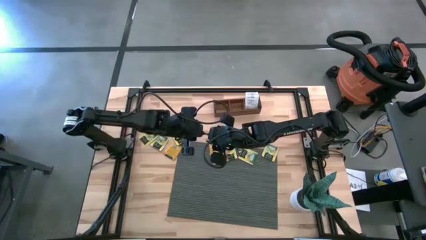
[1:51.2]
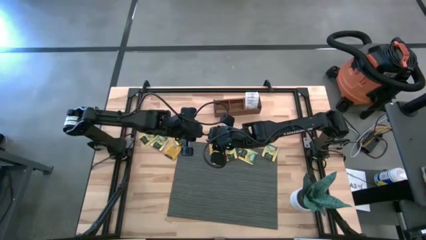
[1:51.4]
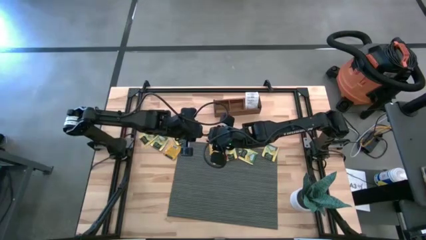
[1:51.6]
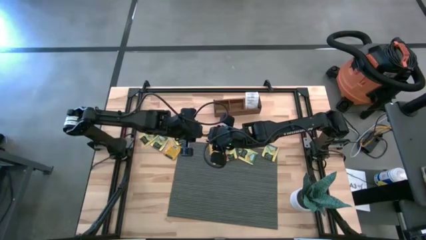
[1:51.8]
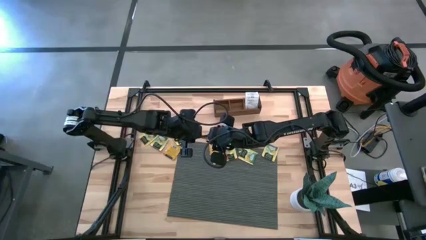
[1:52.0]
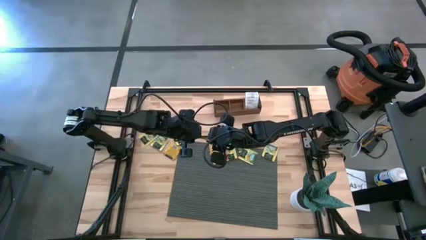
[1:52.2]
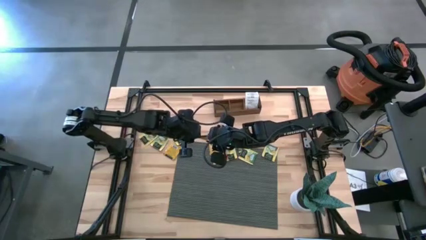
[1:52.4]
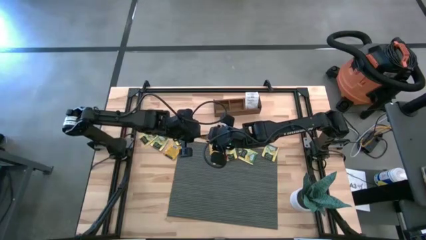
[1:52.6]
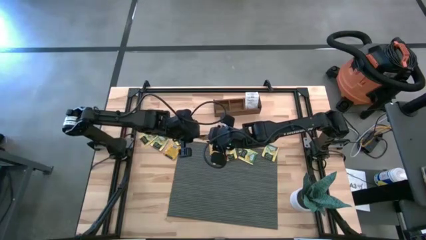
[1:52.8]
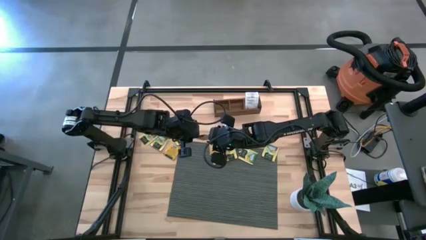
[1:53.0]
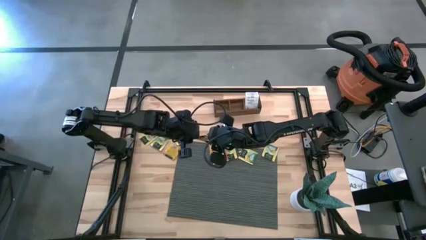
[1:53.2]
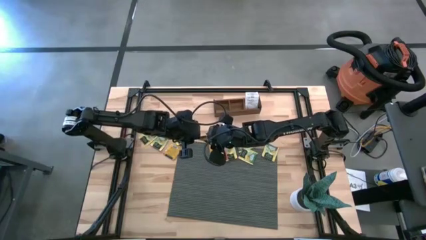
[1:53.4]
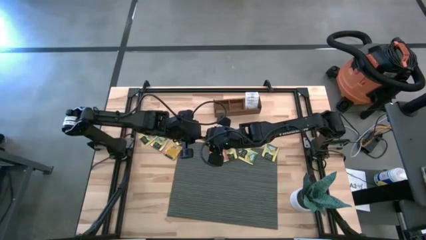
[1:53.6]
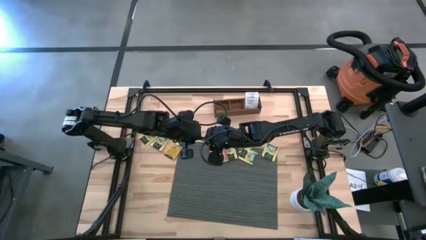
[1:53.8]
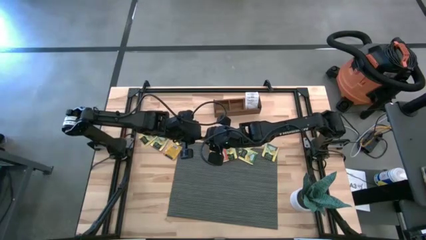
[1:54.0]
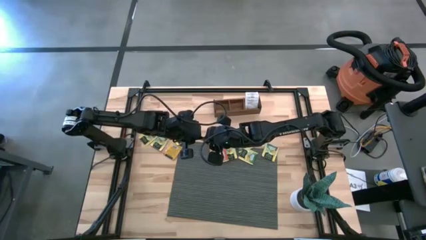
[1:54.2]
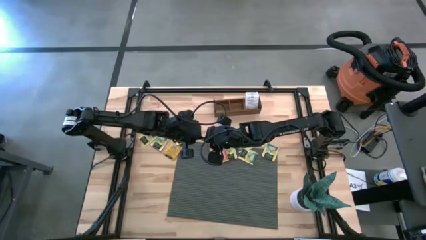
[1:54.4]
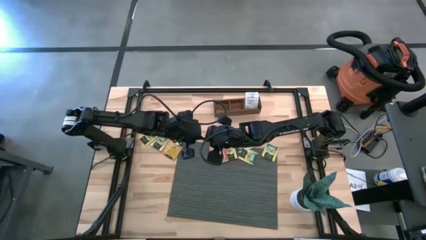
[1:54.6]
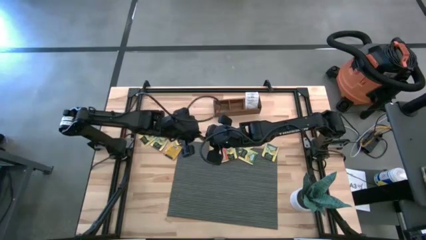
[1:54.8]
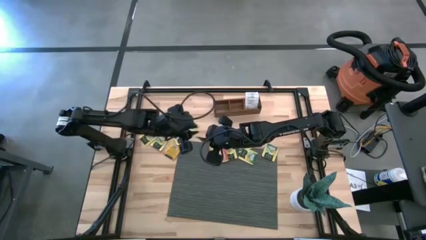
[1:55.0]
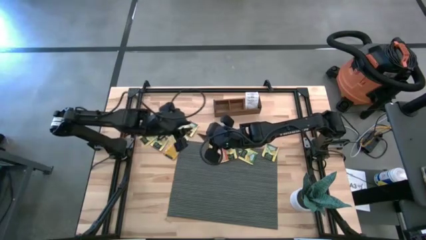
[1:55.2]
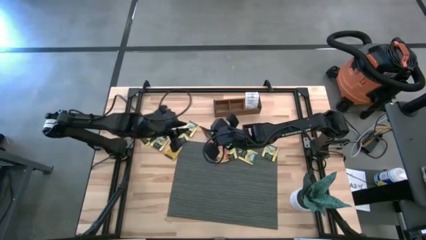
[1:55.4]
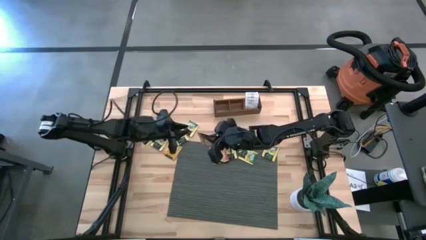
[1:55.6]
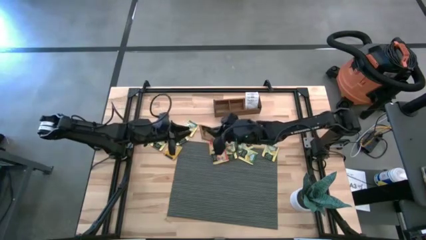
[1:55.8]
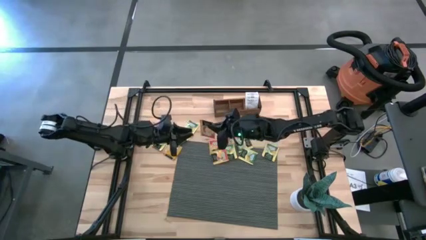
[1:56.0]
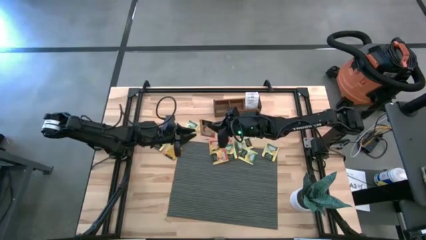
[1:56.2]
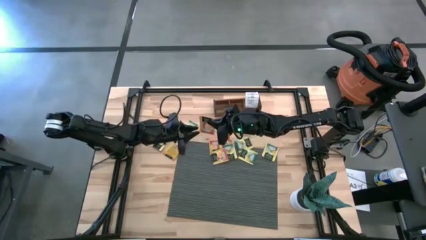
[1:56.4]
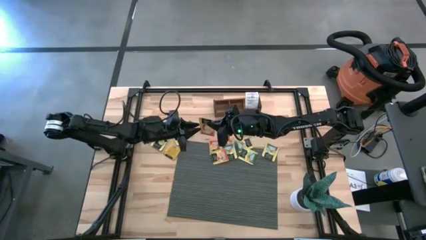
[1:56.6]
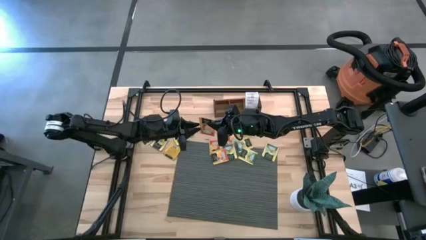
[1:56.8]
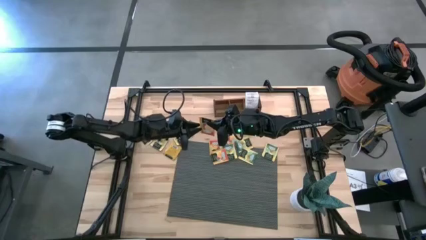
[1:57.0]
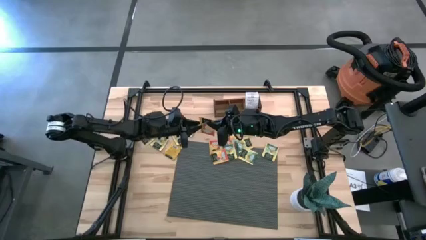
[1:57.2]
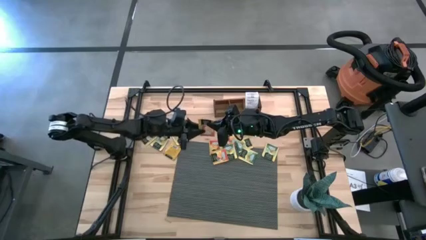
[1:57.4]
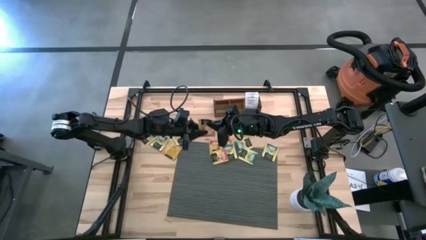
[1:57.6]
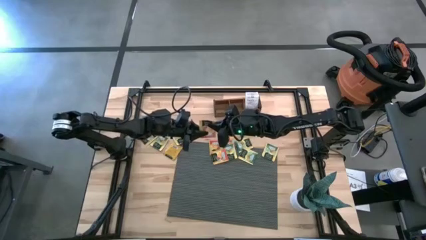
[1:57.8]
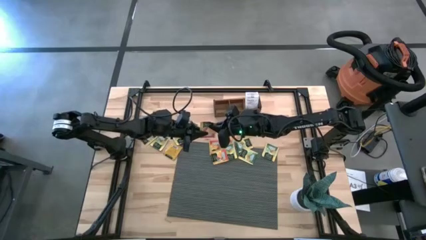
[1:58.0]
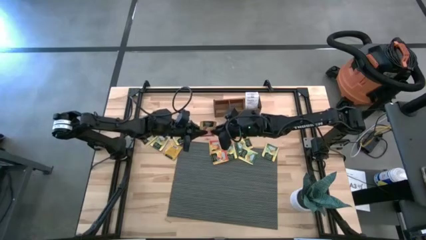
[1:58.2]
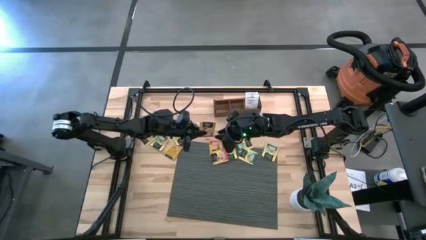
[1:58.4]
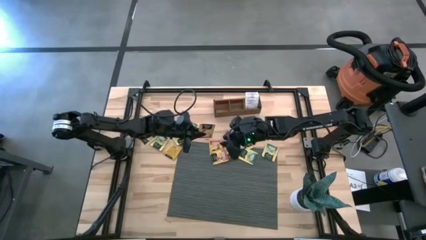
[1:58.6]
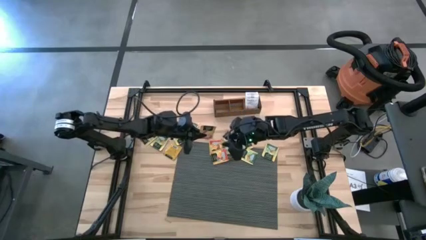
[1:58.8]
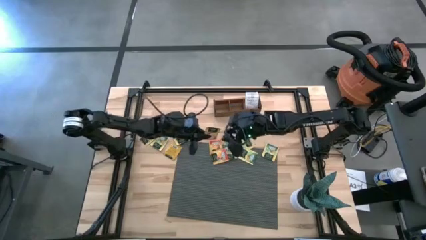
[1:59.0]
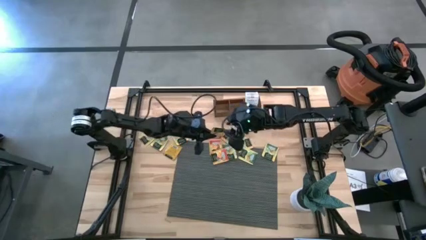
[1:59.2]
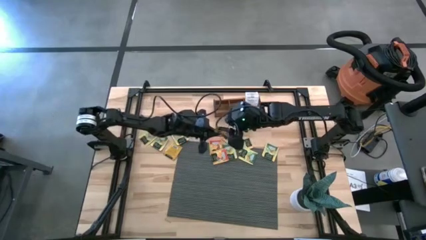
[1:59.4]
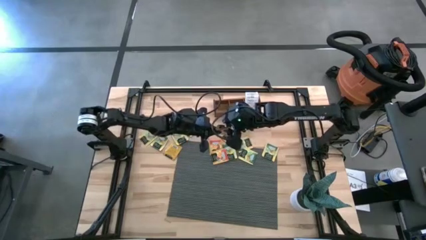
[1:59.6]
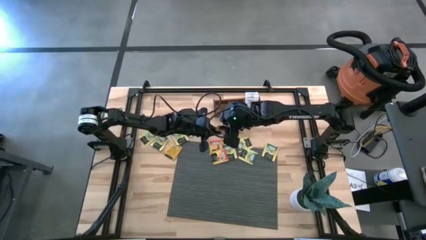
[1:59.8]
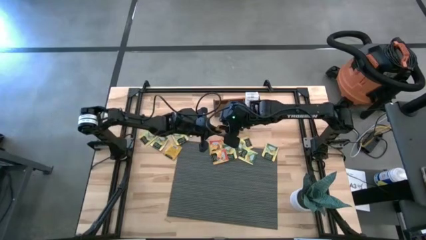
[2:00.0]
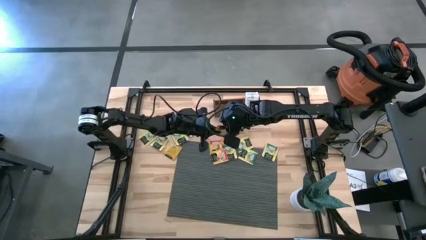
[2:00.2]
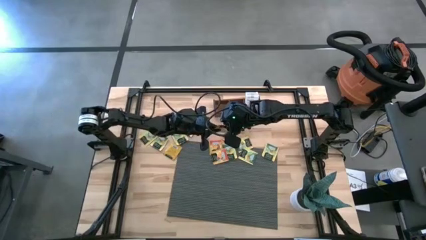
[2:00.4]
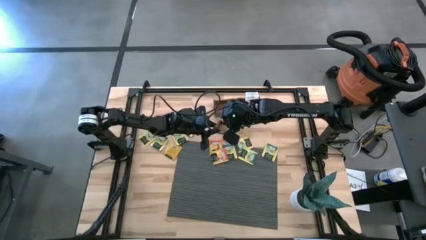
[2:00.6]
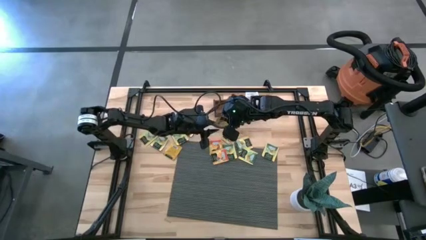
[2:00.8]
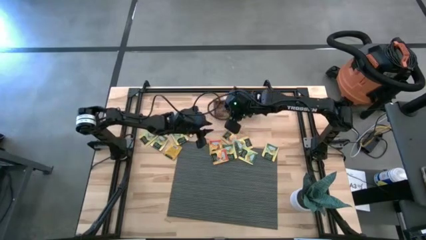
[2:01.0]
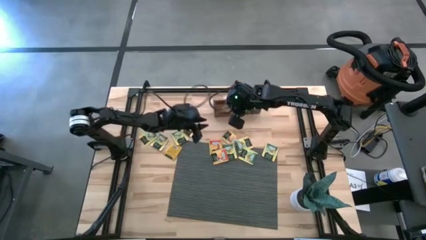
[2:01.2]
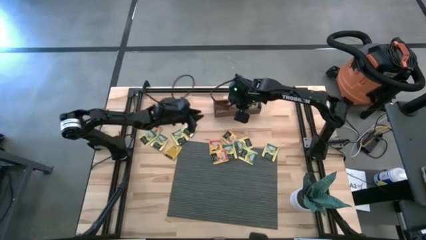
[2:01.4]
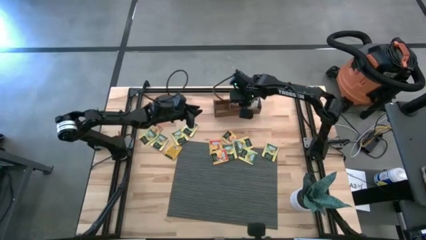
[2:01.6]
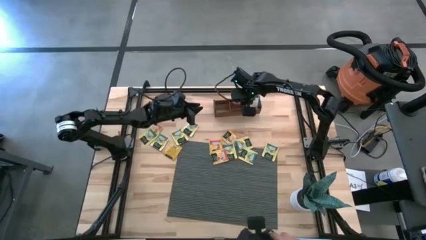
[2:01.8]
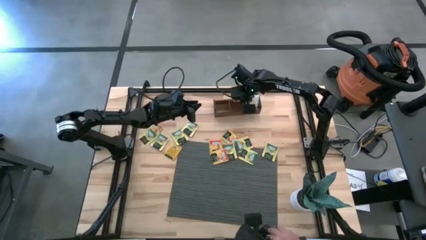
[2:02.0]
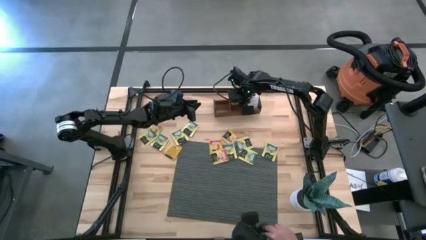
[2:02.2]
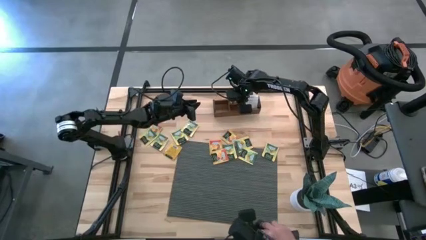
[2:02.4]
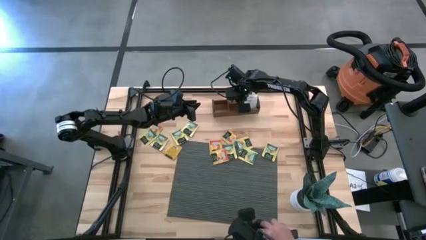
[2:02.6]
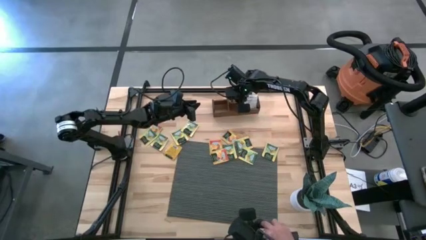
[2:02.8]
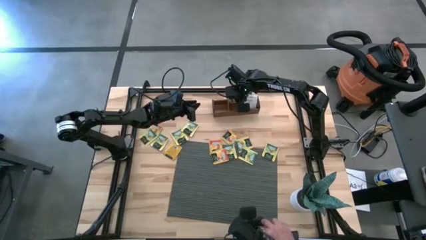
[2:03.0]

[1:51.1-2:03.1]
Task: Pick & Place Tea
Put the orange tea bag into the middle section of the wooden organizer

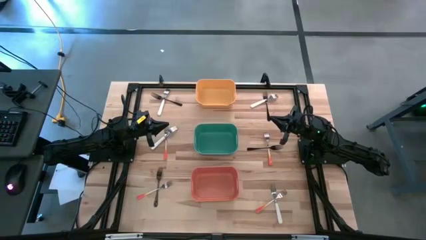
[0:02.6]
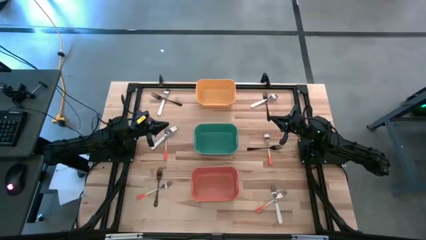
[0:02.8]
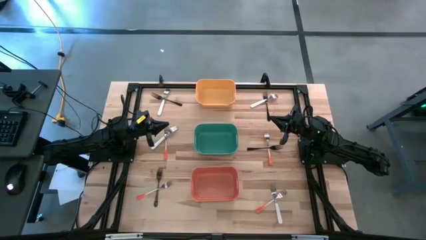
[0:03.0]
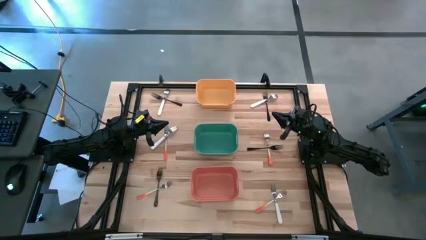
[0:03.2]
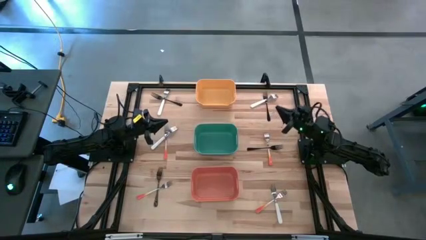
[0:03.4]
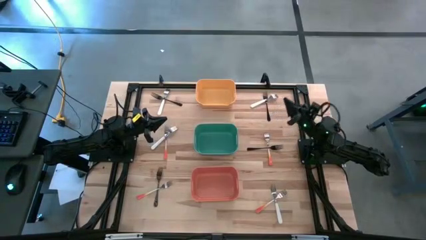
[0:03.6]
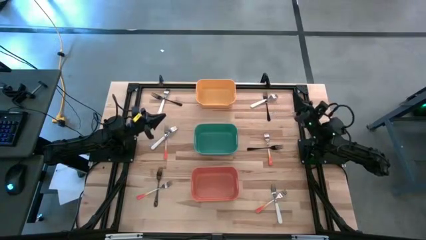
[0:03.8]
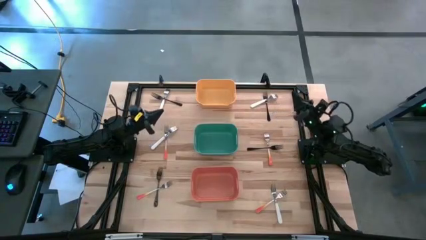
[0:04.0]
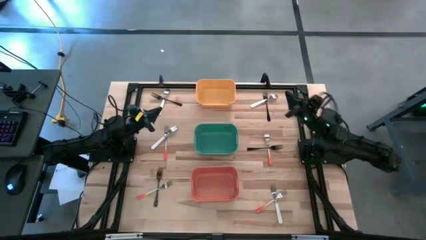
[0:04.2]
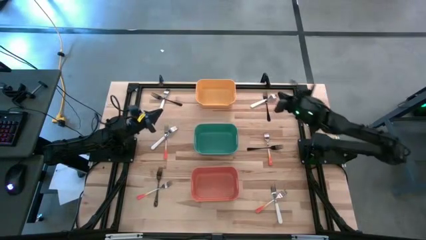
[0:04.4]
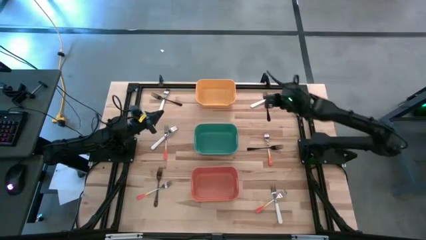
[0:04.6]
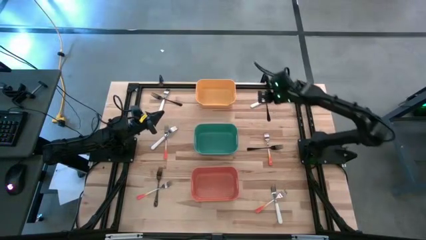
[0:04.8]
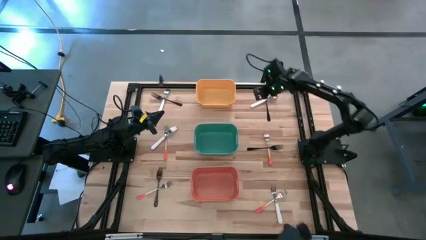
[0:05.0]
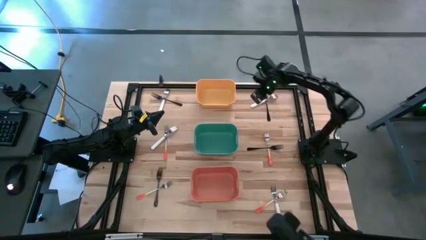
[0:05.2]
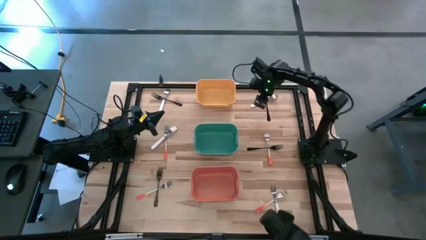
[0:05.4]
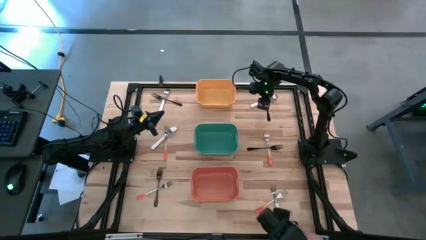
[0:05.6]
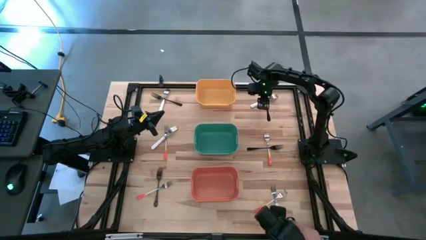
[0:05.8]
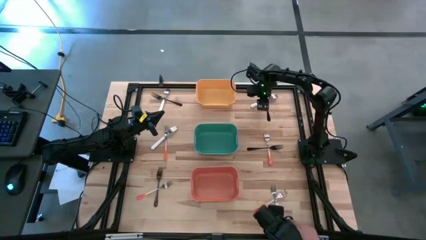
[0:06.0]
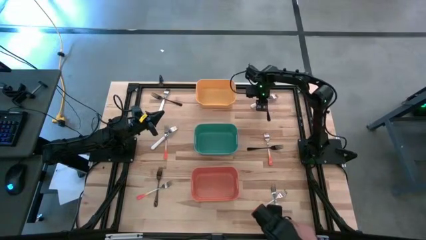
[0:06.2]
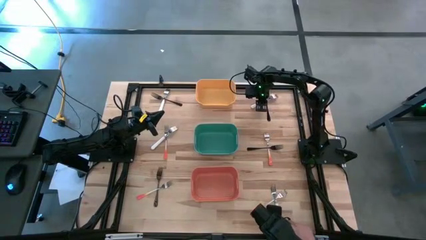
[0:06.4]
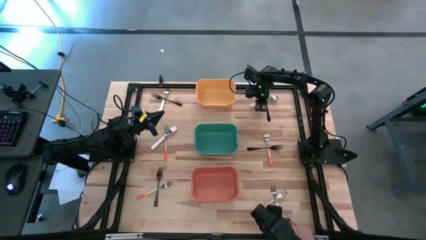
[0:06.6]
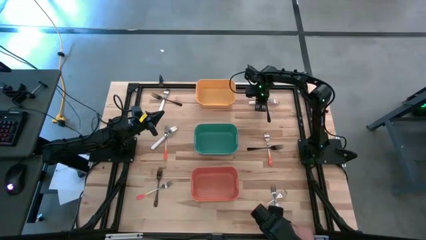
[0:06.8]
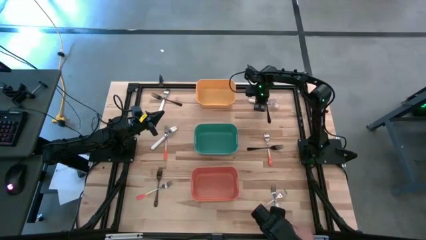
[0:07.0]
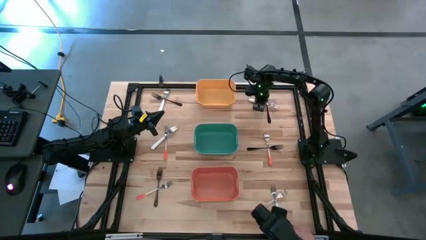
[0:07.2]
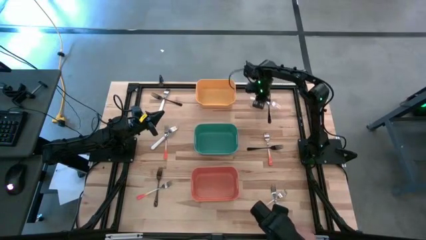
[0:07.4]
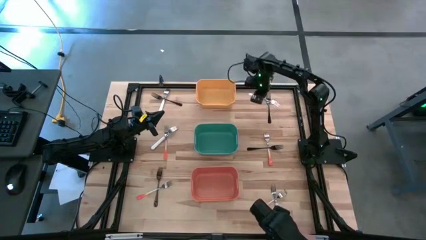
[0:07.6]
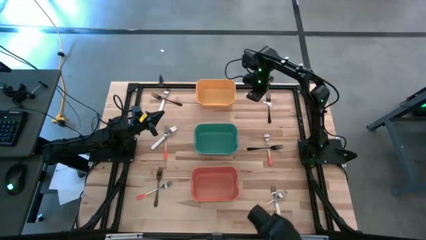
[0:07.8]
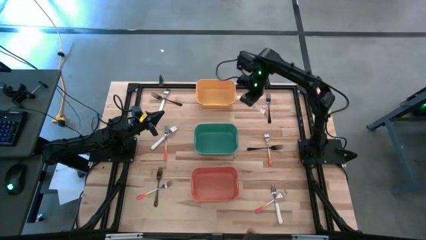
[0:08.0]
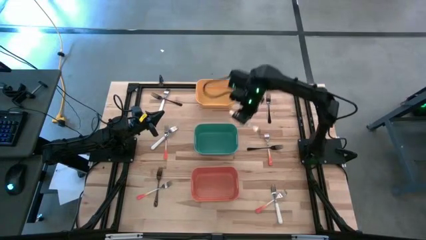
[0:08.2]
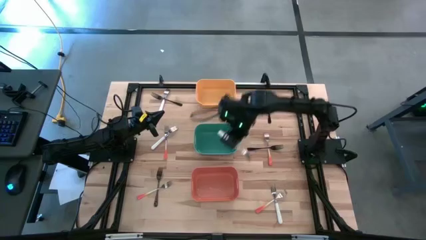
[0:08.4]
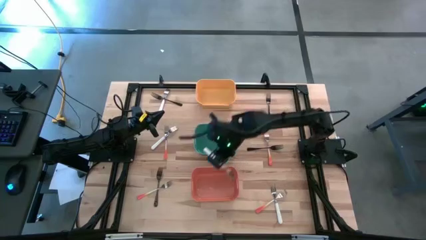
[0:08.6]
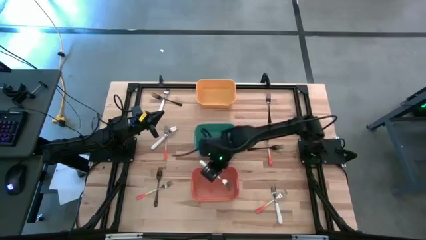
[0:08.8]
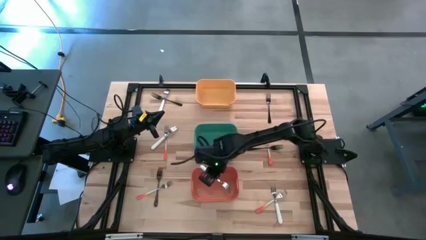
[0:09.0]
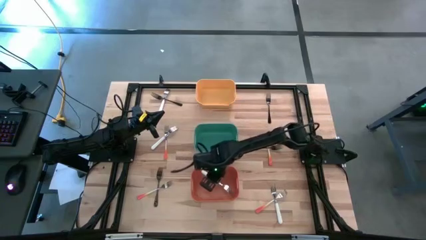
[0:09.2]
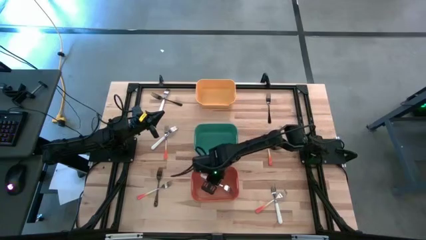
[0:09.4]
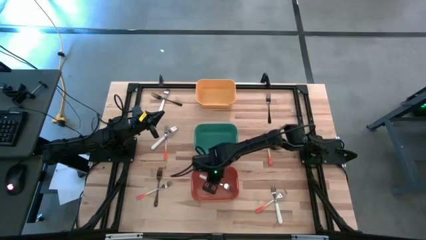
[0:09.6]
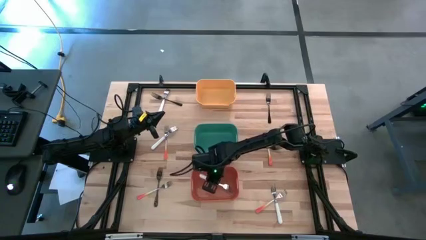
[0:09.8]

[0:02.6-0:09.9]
Task: Sort silverware by color (type)
Put the white fork into the orange bin
